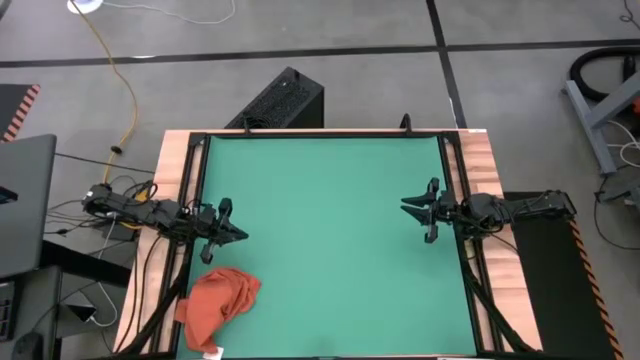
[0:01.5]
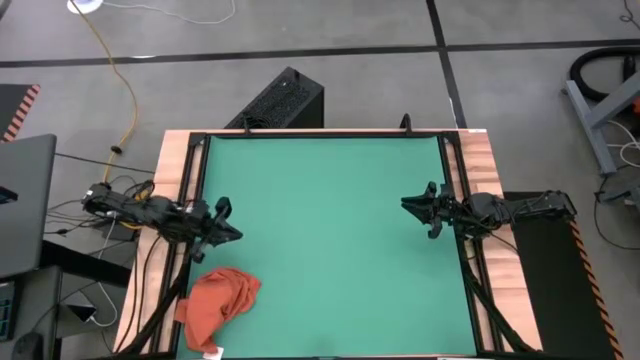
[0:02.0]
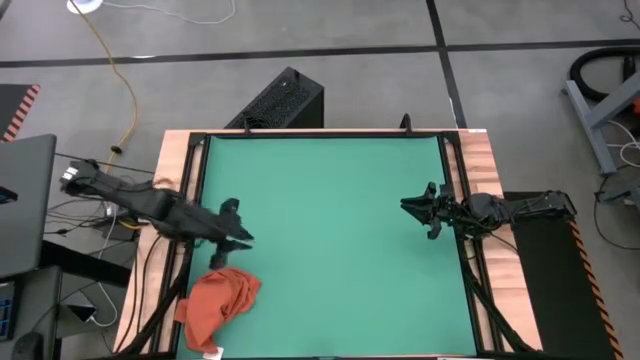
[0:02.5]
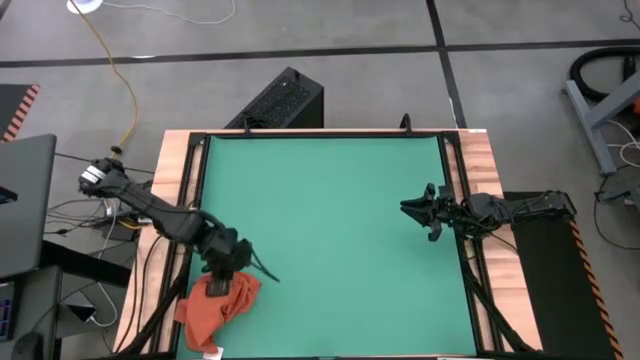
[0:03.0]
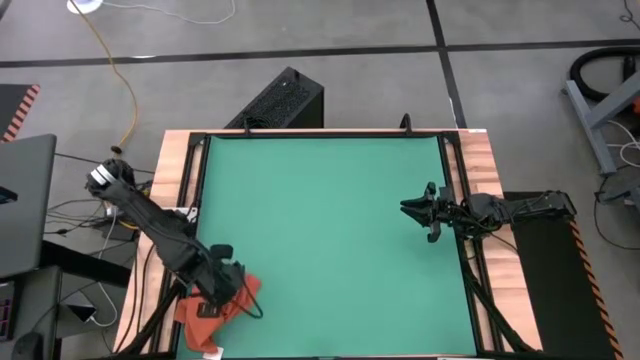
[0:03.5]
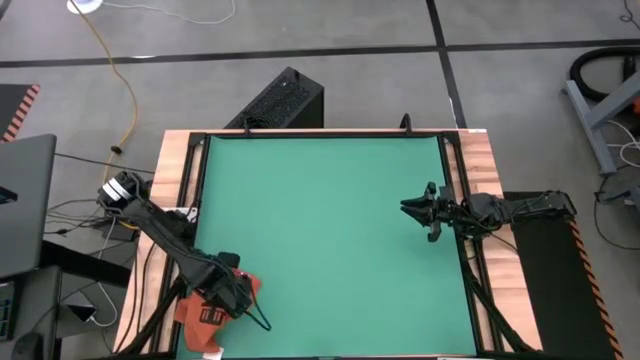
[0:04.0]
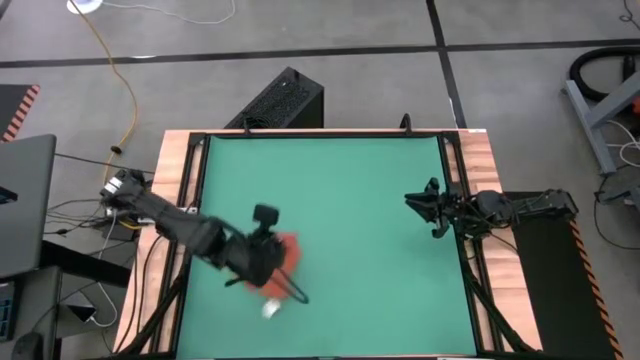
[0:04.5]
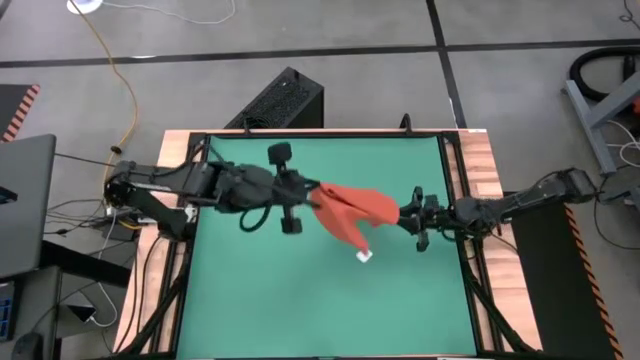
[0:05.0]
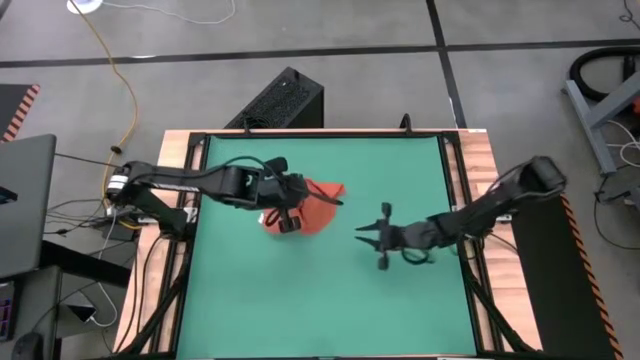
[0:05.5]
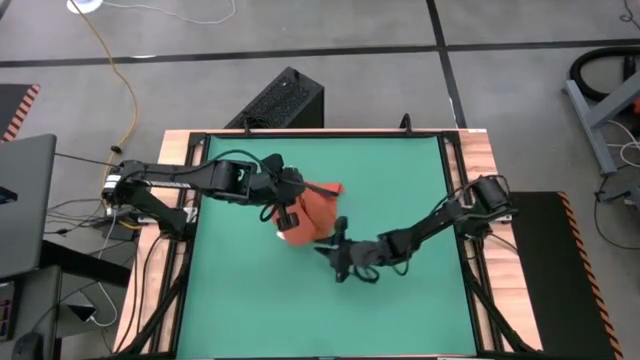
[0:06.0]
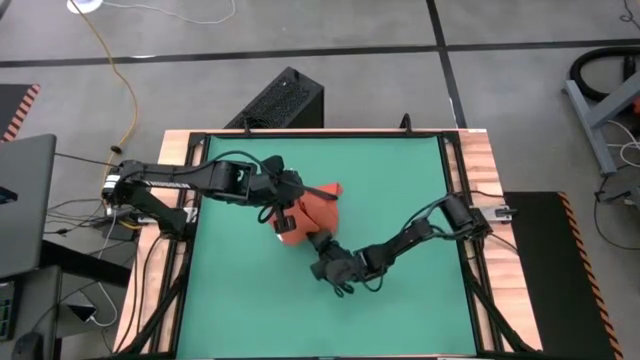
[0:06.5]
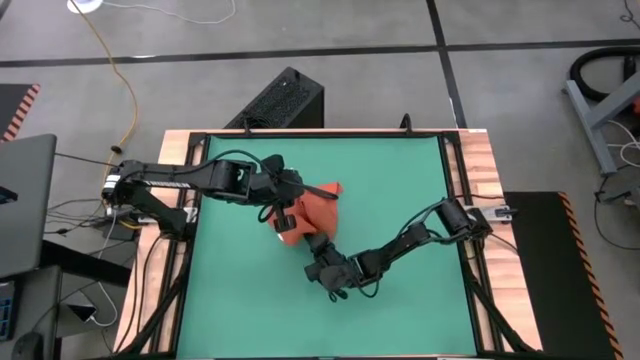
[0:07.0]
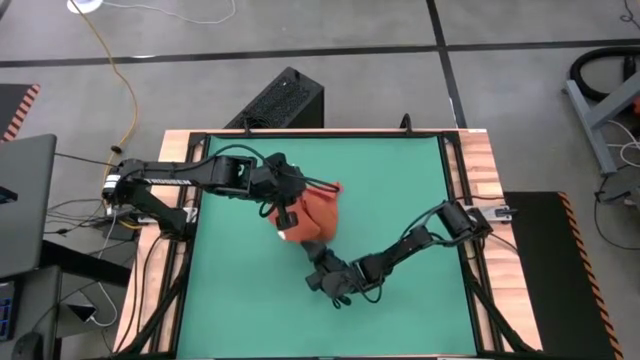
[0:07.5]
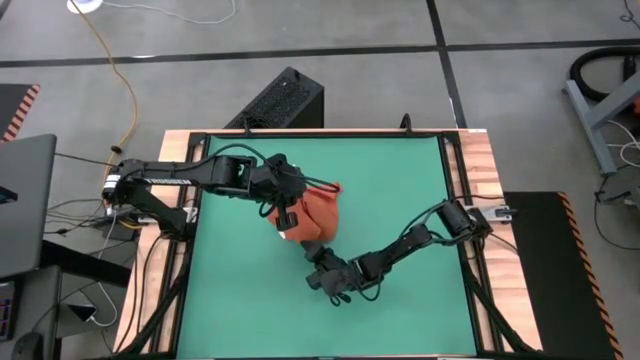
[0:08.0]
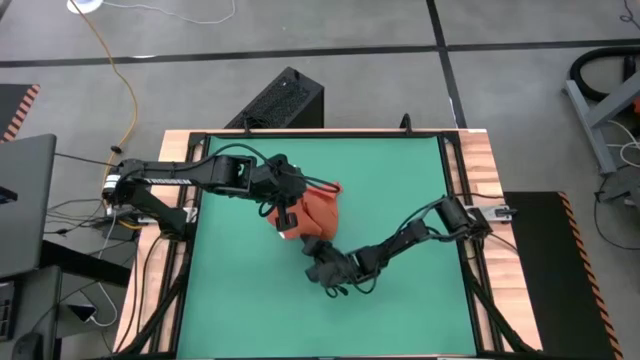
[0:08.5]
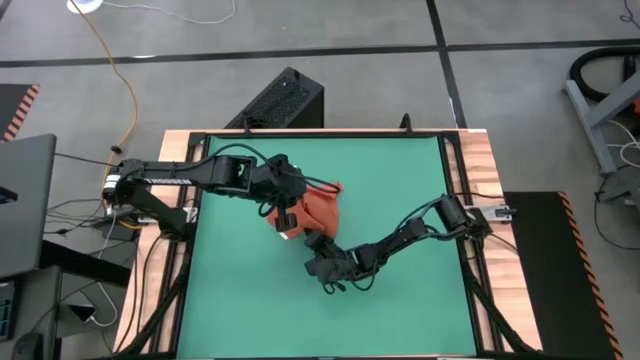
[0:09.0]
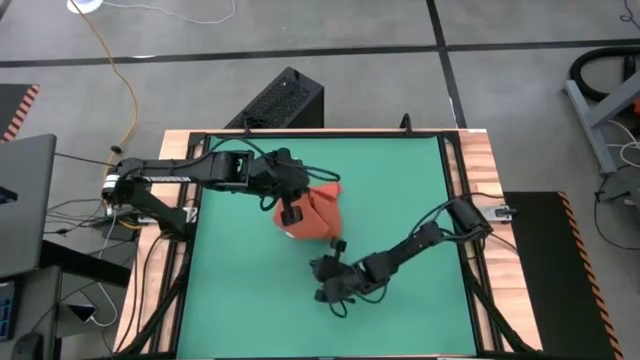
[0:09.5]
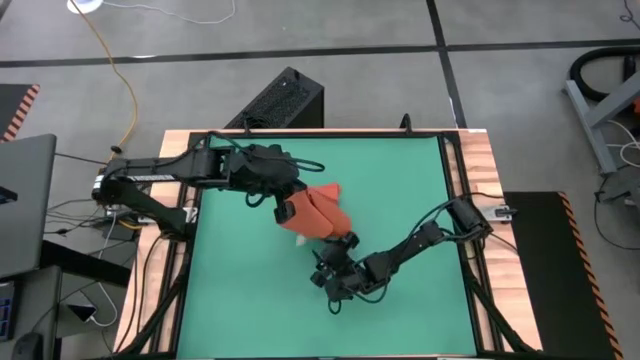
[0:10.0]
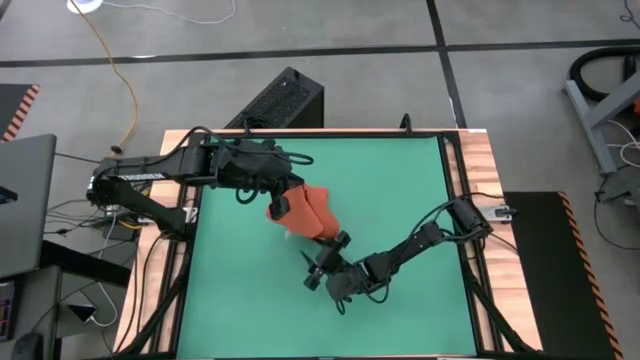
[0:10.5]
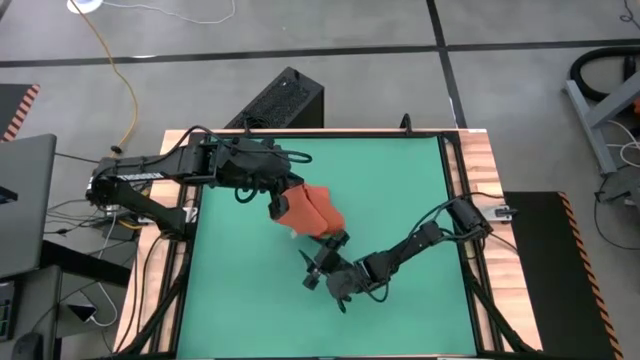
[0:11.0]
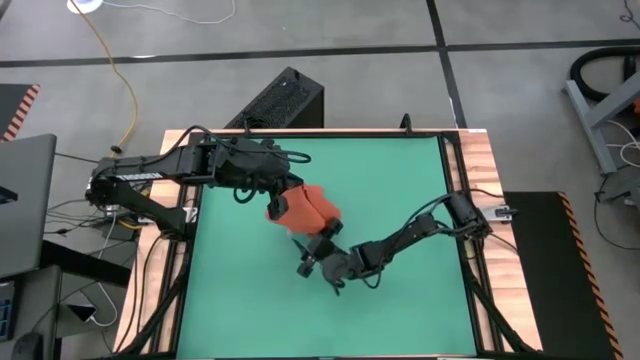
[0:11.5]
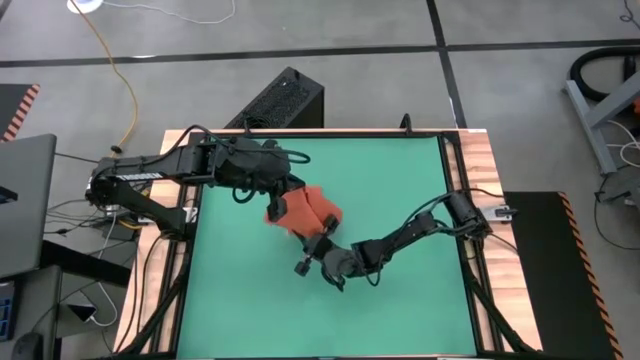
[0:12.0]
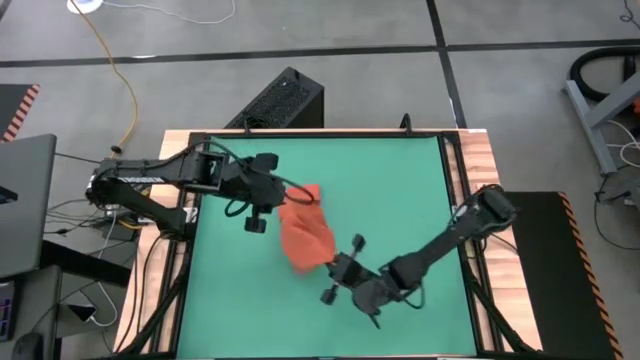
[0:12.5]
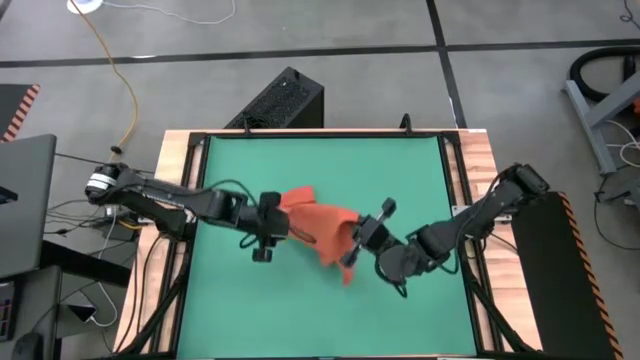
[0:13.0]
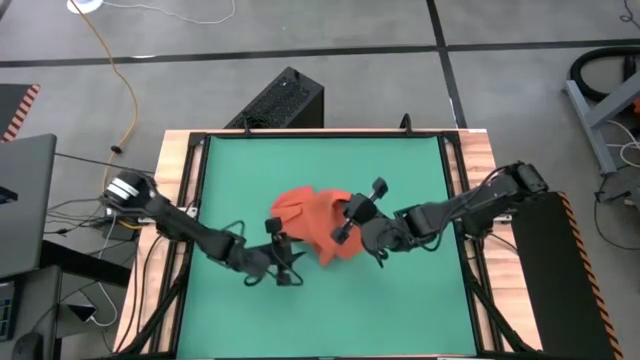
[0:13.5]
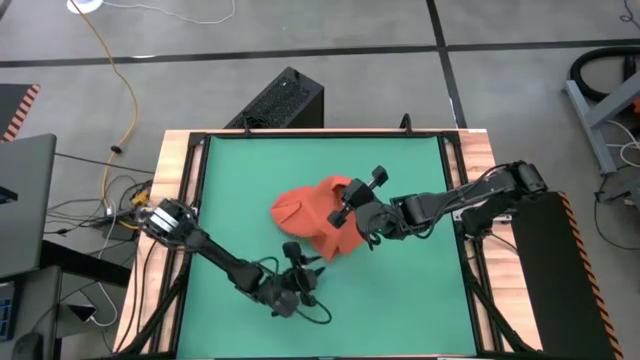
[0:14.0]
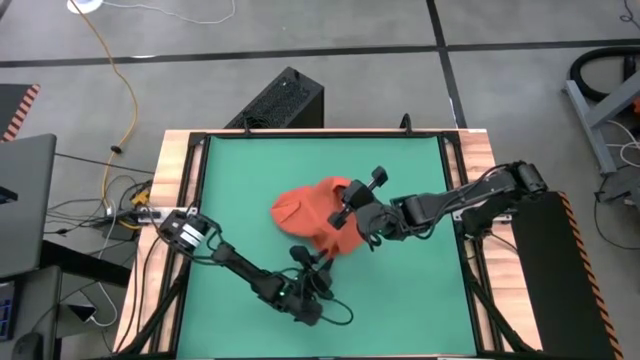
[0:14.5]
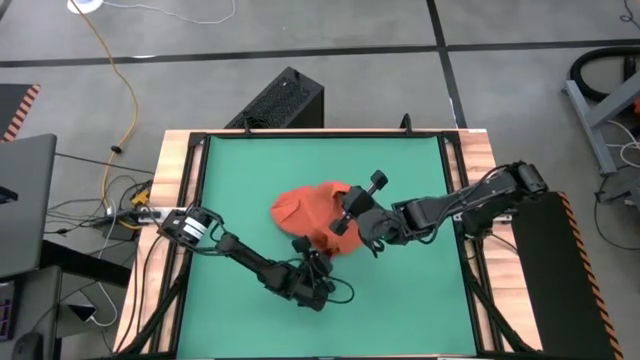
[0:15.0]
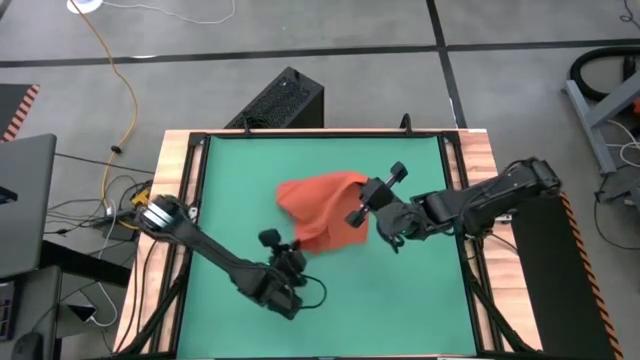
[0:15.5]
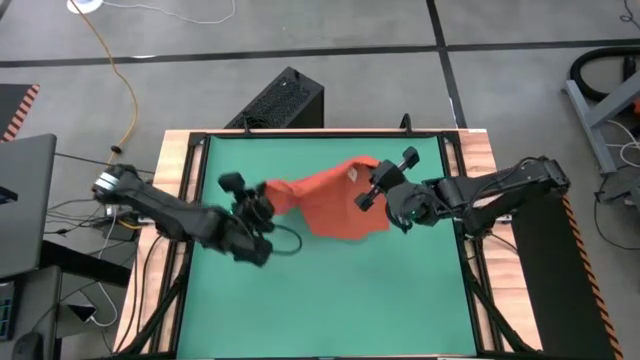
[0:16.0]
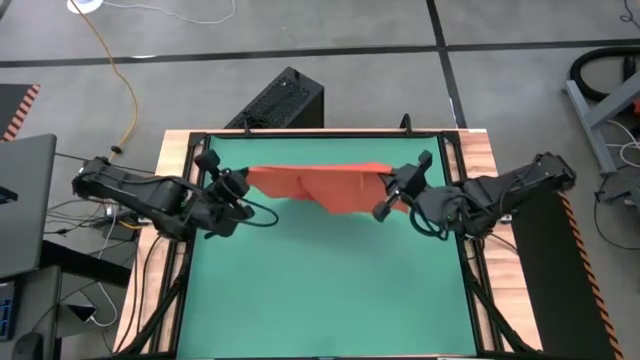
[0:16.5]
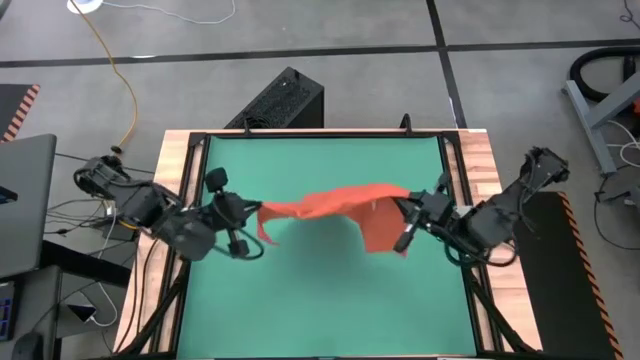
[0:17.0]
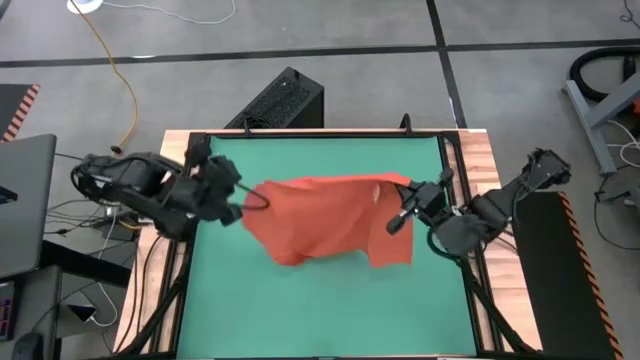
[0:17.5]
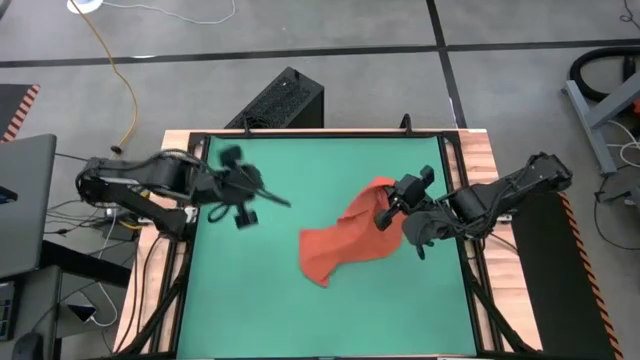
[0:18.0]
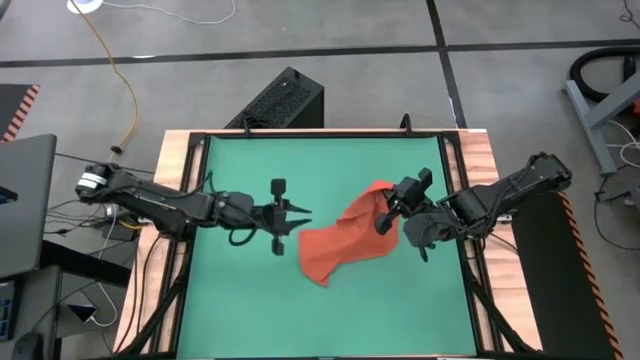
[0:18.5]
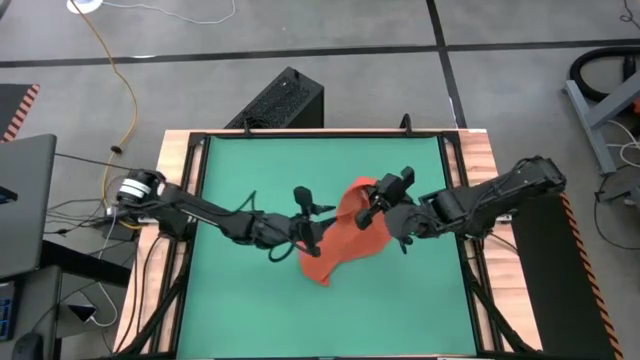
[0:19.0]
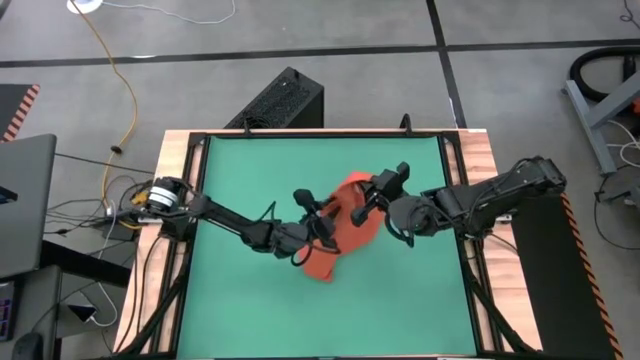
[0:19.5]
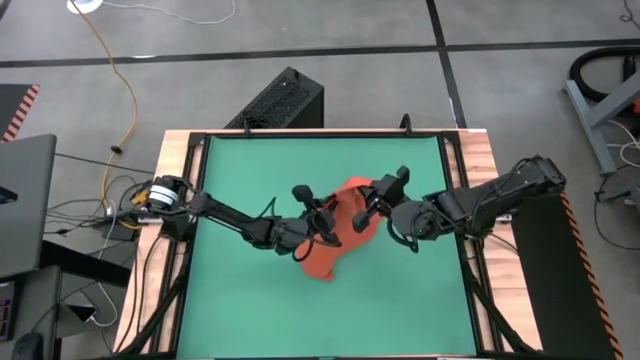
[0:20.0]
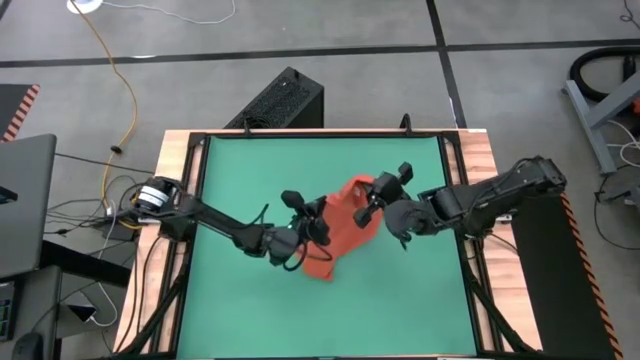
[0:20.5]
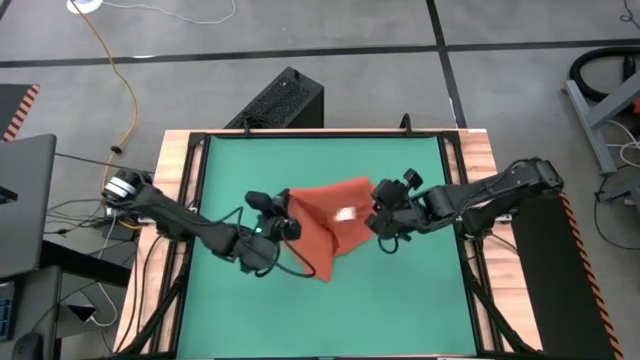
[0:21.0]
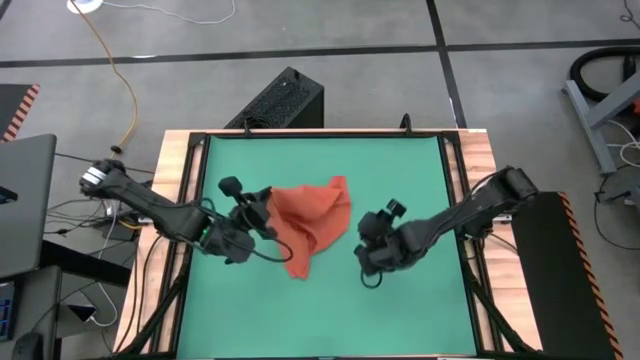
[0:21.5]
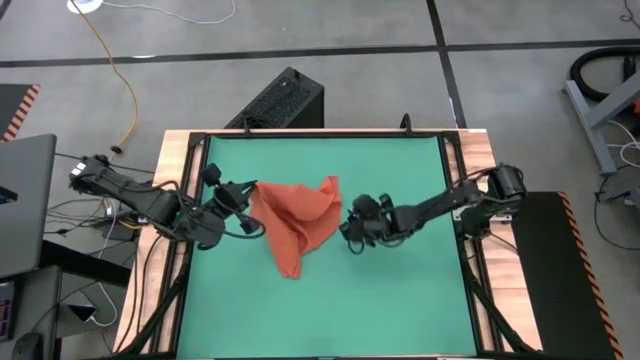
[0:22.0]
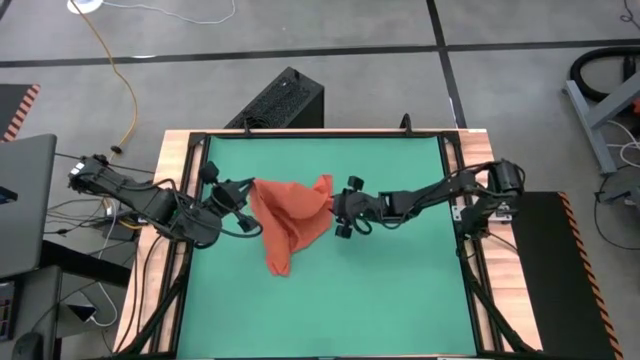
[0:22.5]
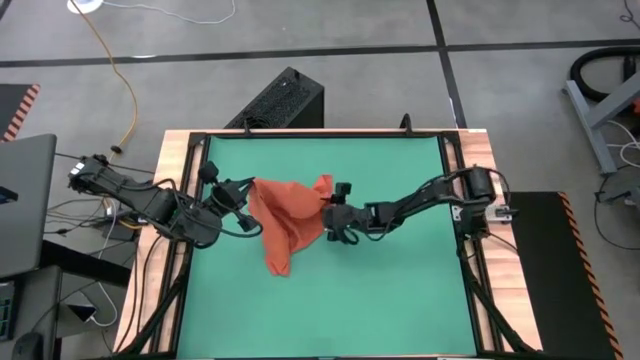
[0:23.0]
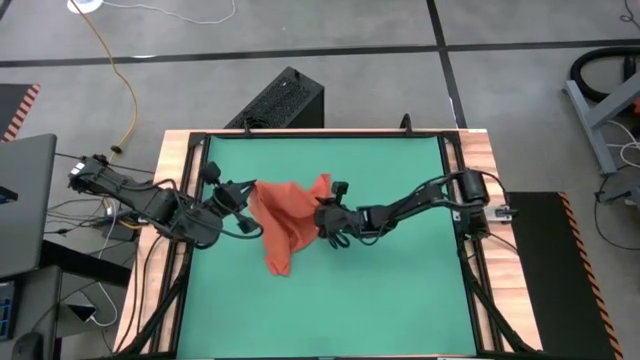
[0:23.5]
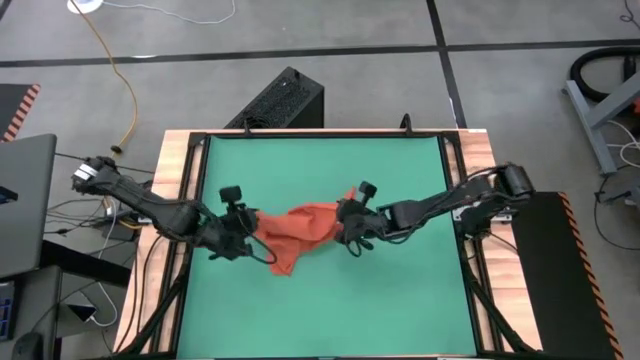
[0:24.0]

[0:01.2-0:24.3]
Task: Roll towel
Roll the orange towel
